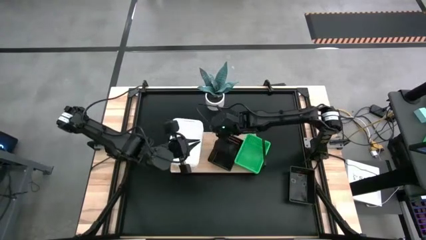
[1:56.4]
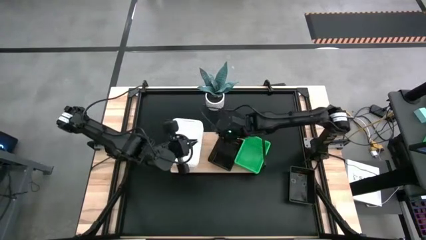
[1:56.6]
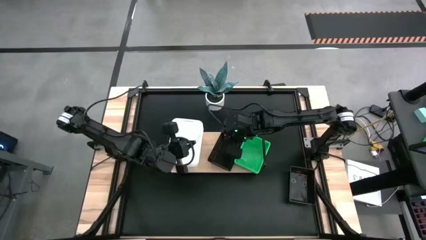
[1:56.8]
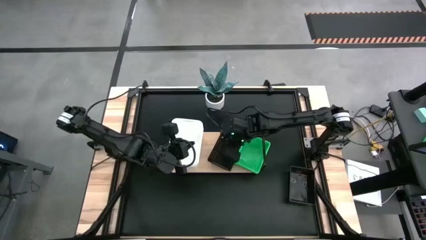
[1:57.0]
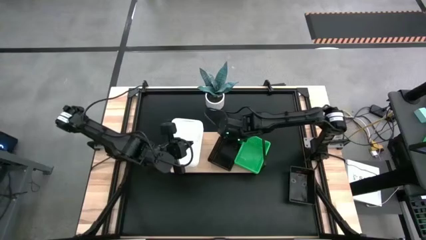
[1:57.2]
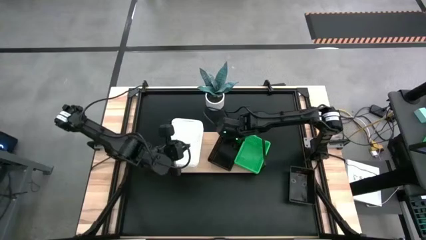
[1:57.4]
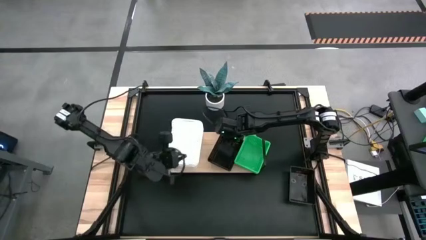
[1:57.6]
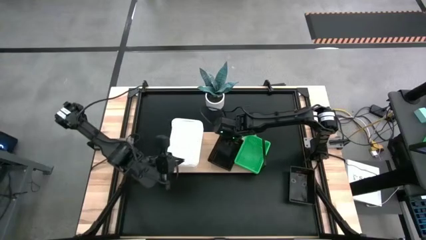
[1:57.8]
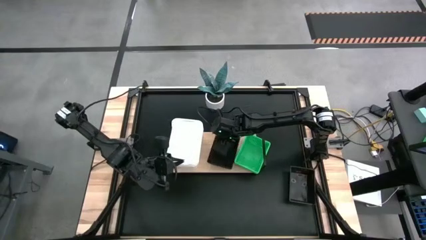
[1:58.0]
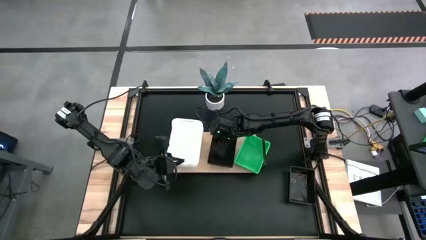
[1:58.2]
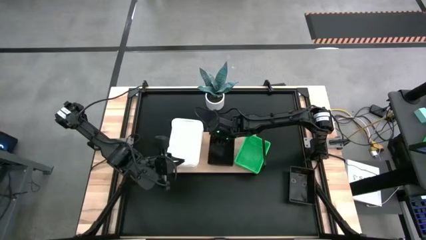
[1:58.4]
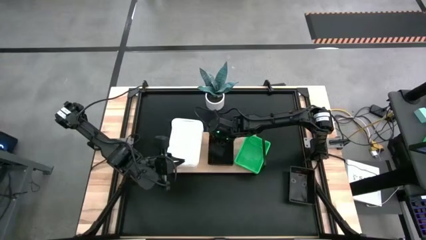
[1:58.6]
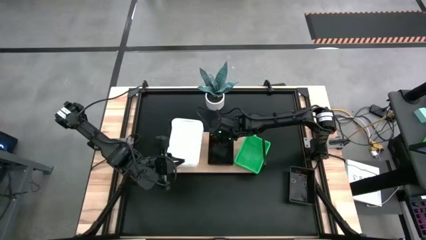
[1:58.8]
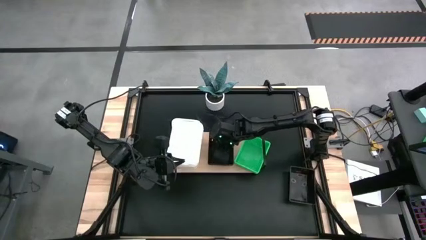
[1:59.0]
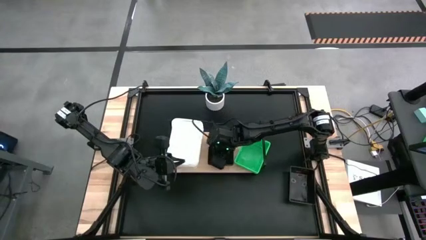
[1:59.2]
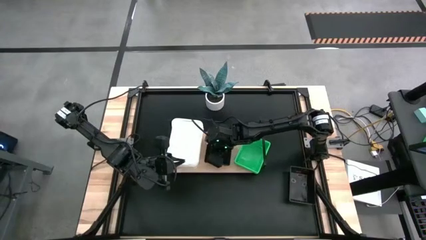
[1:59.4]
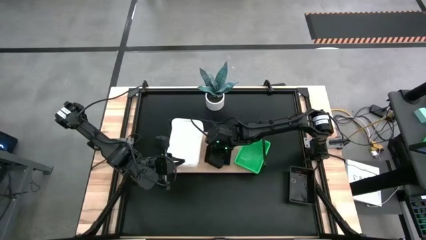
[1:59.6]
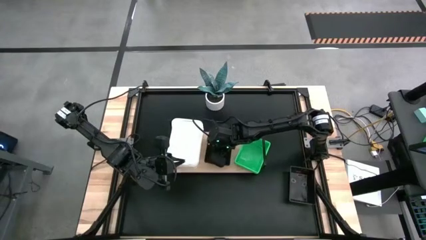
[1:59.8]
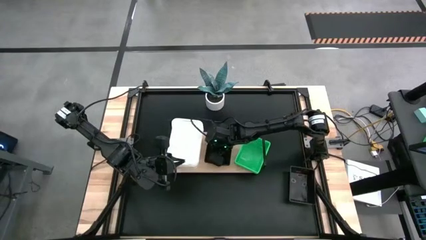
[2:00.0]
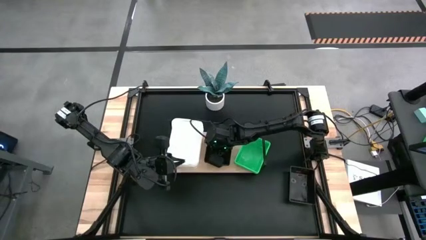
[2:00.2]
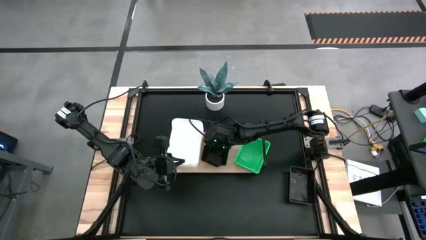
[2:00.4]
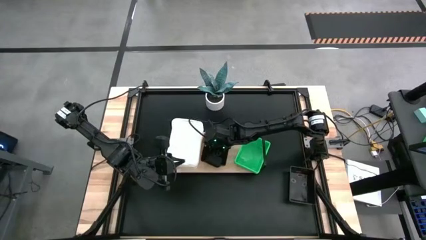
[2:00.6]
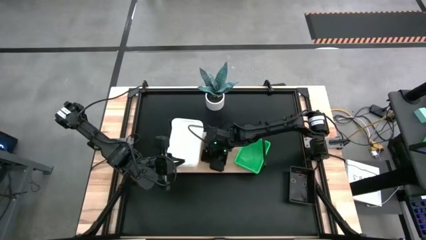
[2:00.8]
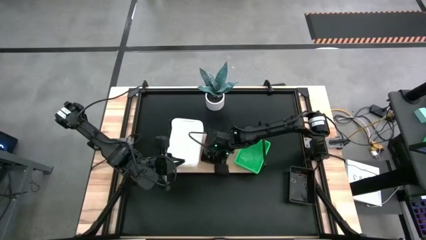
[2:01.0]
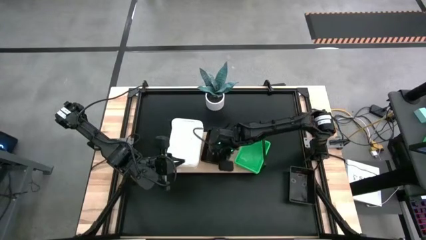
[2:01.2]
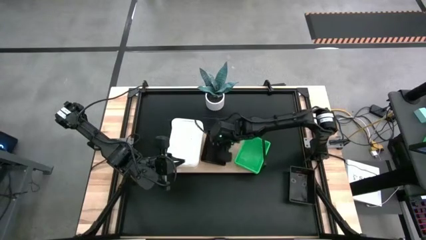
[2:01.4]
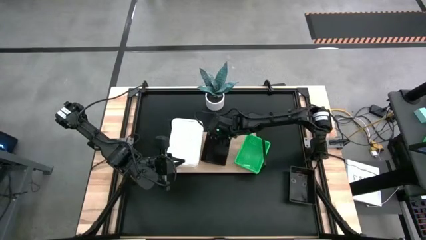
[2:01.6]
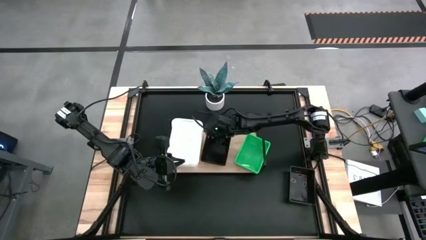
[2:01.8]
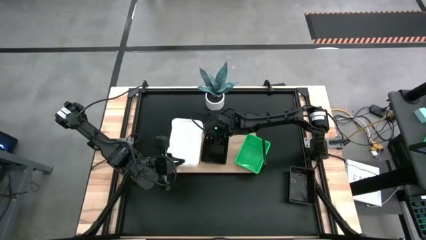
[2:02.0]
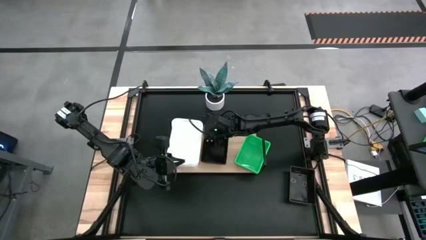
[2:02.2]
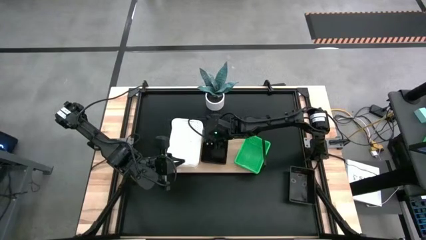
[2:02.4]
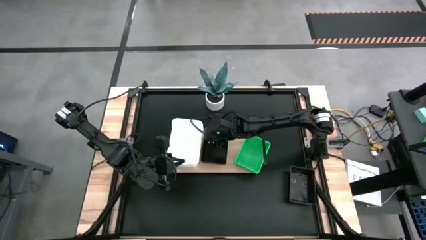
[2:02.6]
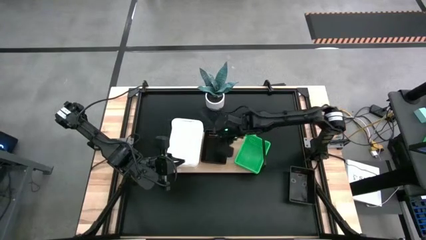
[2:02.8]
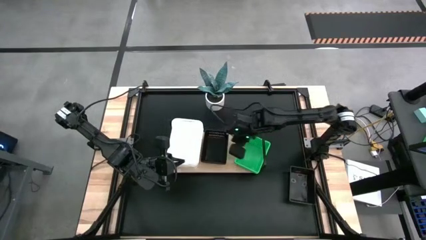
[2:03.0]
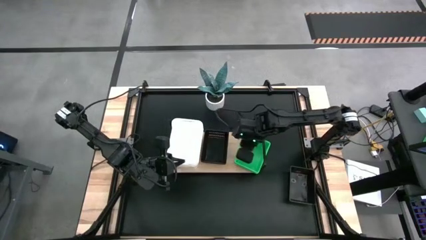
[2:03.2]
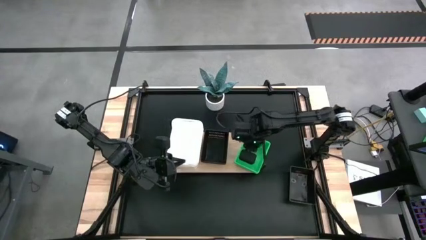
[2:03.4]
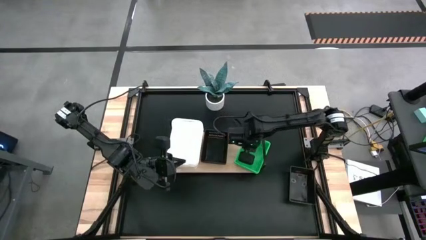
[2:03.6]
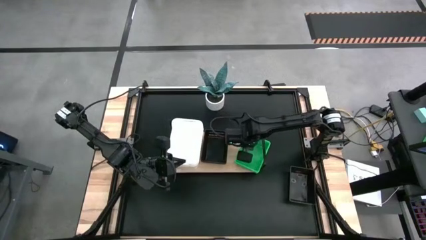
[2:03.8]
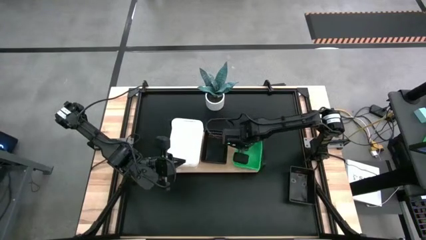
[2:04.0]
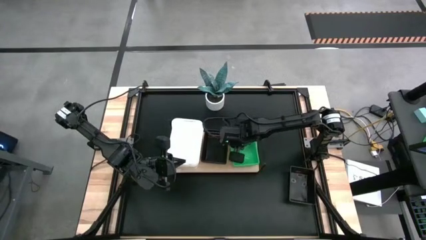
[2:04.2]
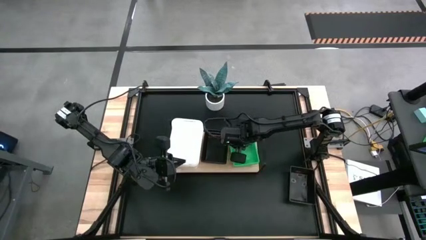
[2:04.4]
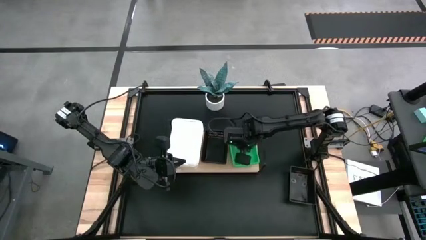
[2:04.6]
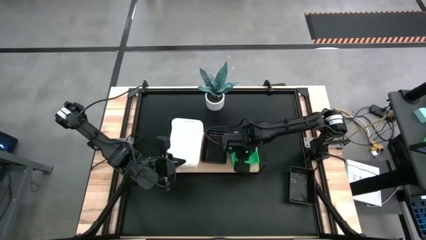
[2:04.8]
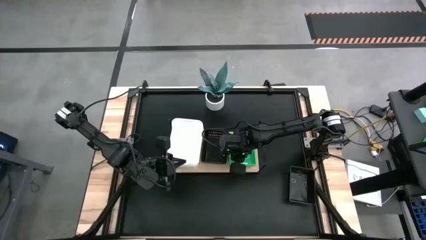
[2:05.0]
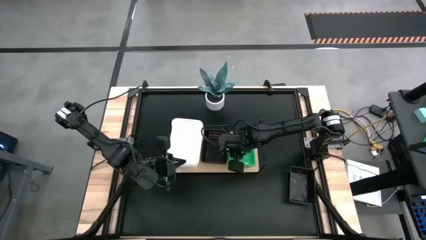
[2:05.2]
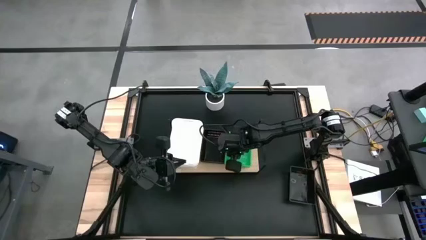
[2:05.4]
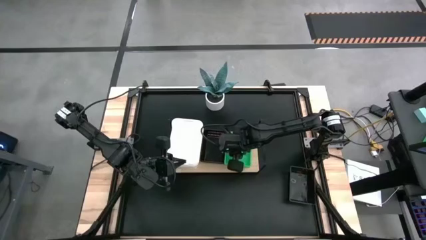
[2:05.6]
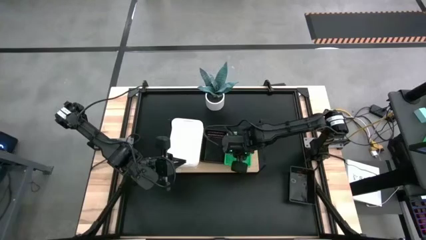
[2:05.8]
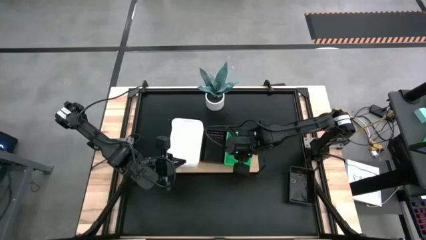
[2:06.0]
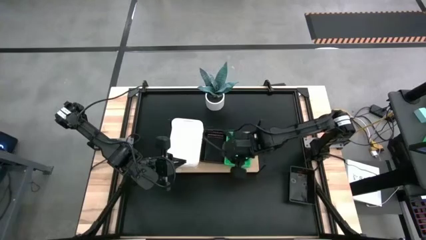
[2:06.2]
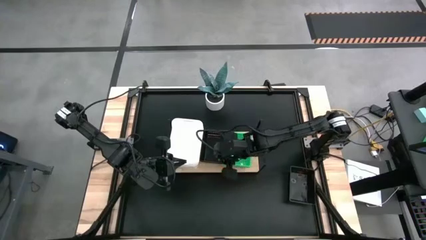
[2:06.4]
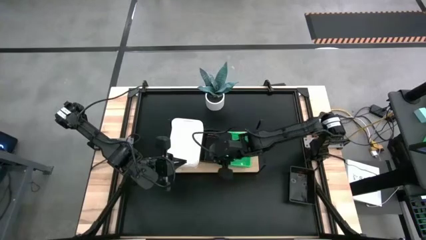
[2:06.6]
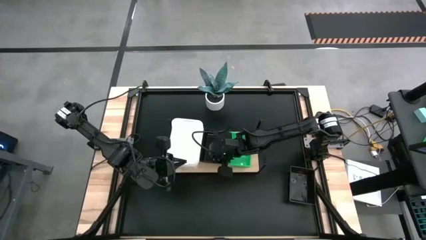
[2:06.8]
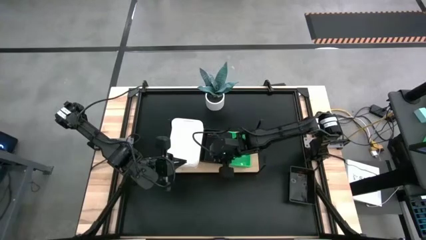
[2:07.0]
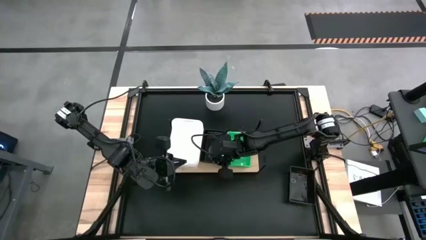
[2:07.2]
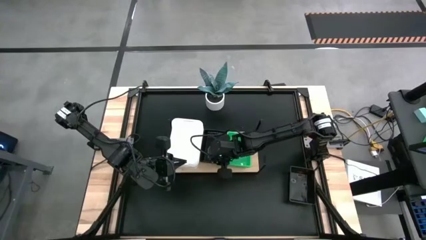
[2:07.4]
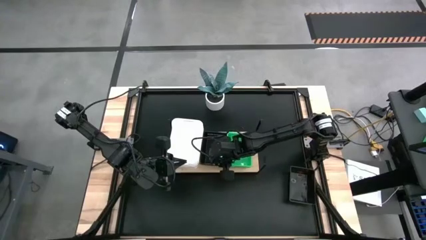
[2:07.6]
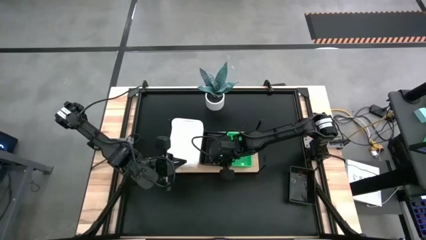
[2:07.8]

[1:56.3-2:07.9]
Task: Stack baskets on shelf by color
Adjust the stacked bins on the shelf

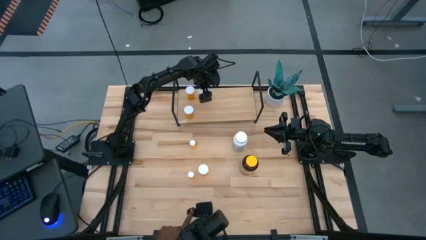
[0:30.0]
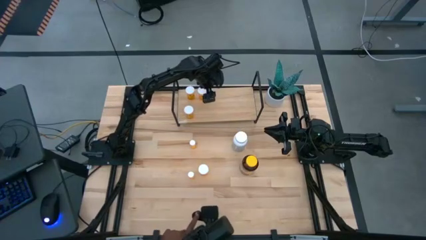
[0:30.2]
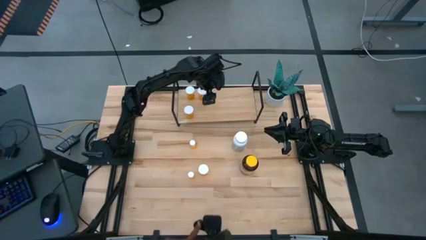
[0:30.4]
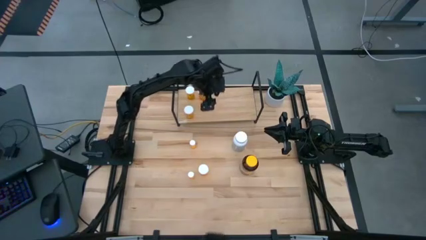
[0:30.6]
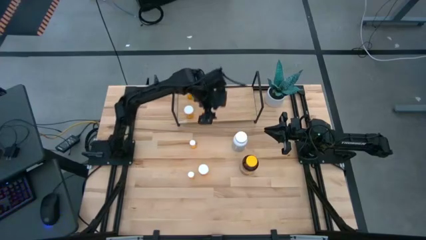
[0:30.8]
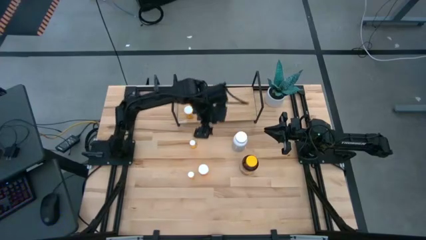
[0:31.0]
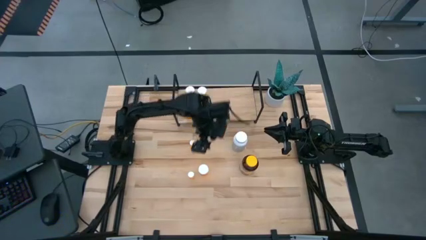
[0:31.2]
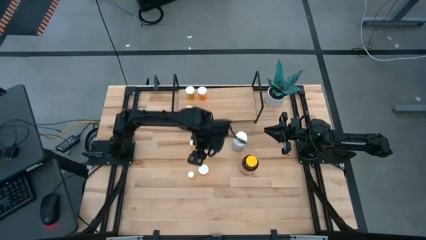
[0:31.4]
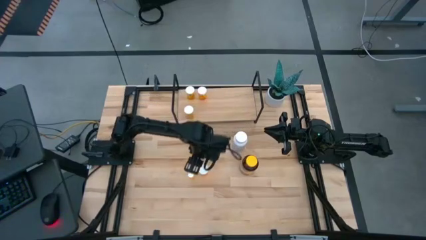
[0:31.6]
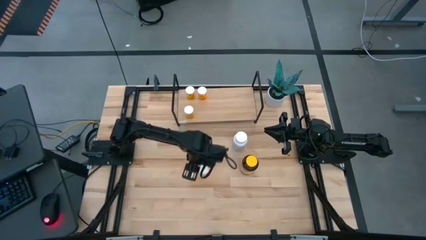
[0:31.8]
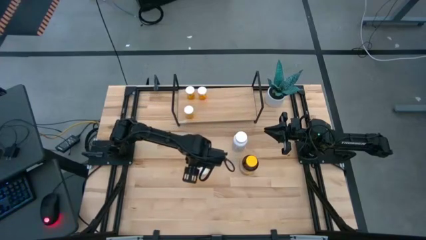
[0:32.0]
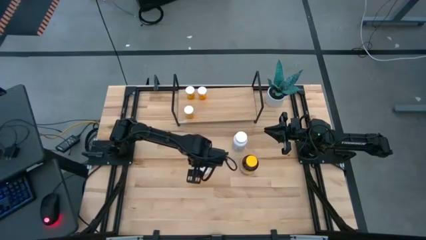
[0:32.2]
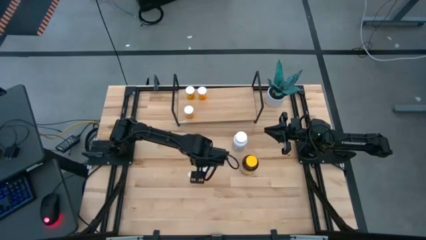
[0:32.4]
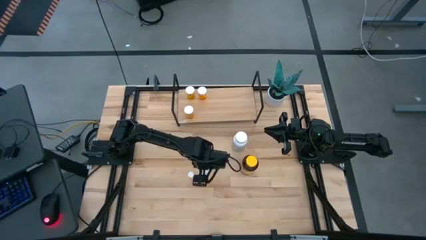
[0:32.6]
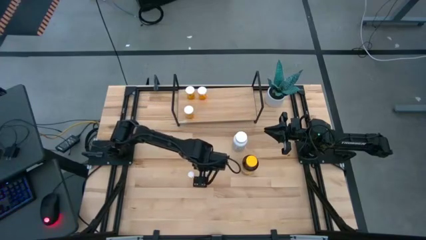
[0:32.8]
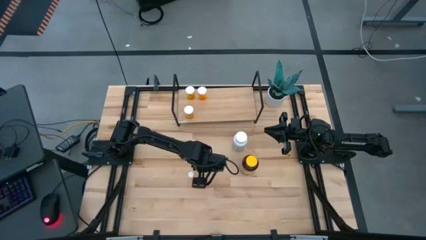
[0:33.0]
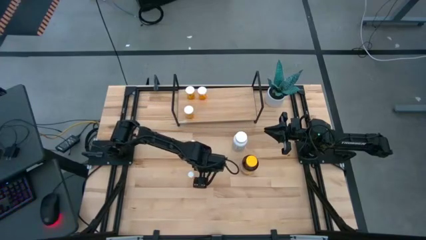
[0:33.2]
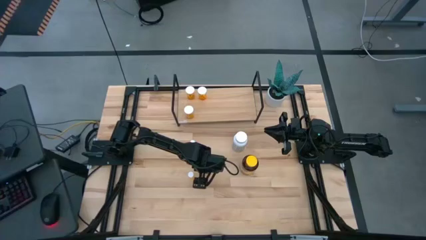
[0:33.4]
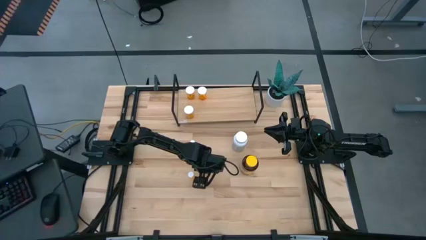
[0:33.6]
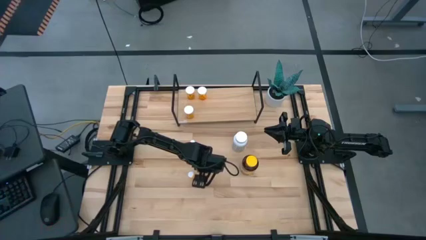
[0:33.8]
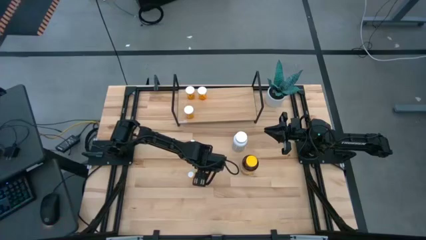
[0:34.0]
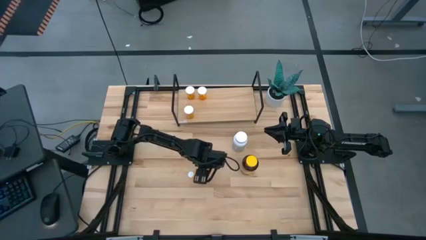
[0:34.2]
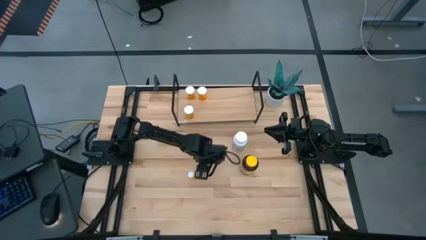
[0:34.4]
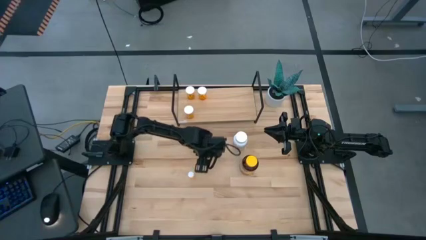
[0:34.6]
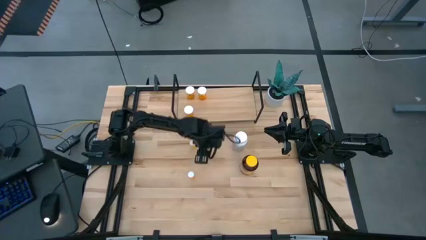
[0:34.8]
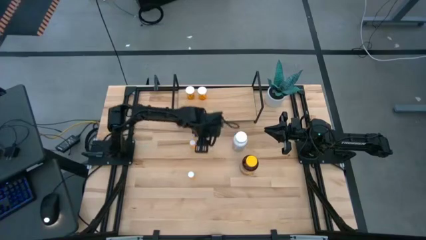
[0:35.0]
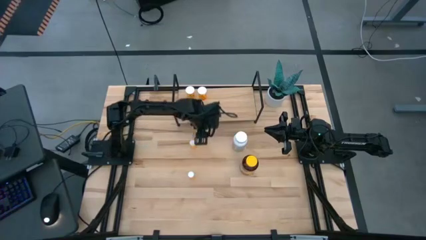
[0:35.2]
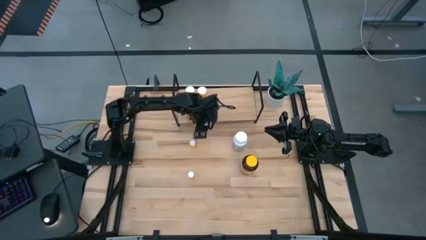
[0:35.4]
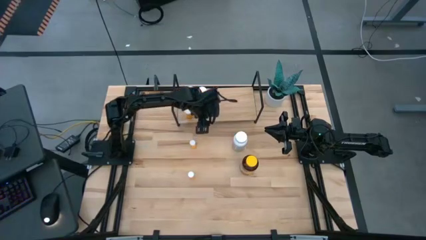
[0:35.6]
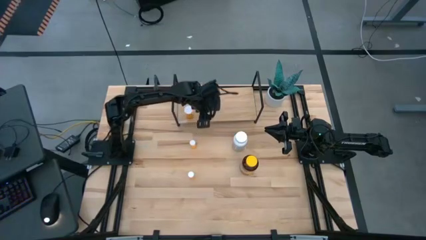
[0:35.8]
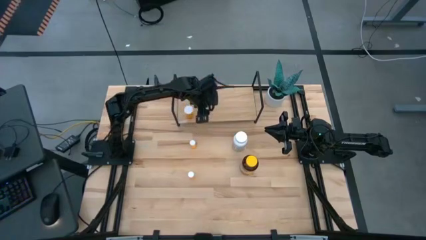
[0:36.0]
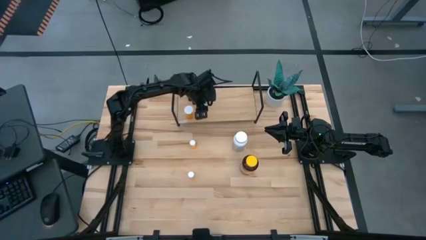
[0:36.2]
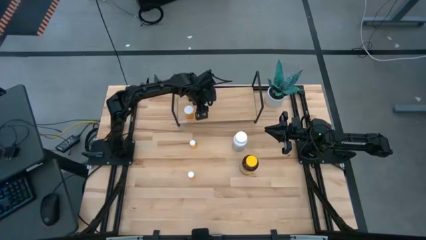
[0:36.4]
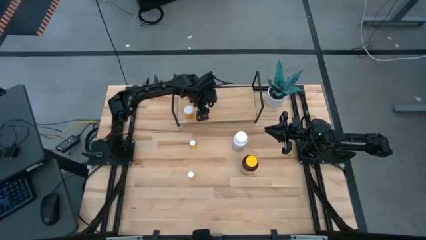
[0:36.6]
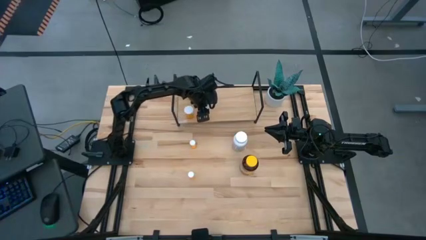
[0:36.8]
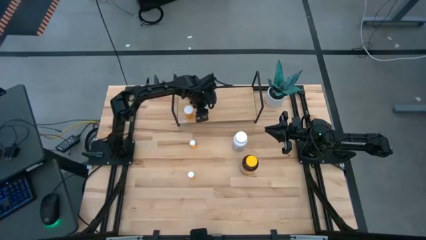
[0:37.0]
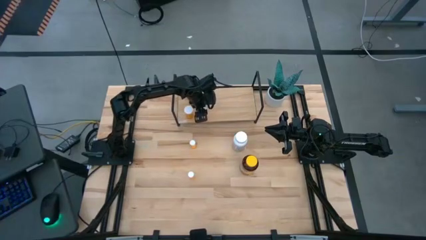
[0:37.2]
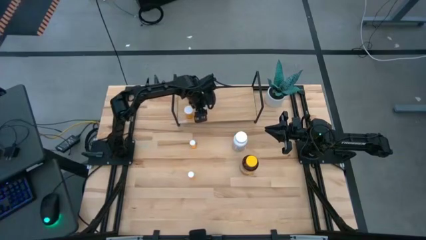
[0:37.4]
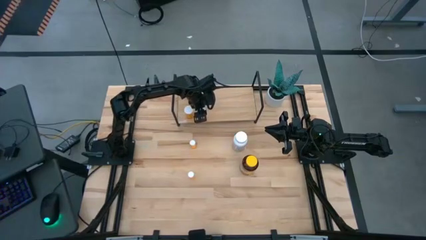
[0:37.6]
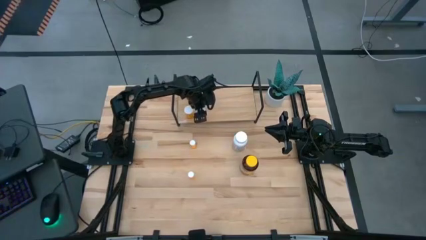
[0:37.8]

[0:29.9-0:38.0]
Task: Pick and place medicine bottles onto shelf by color
Put the big orange pill bottle on the shelf
